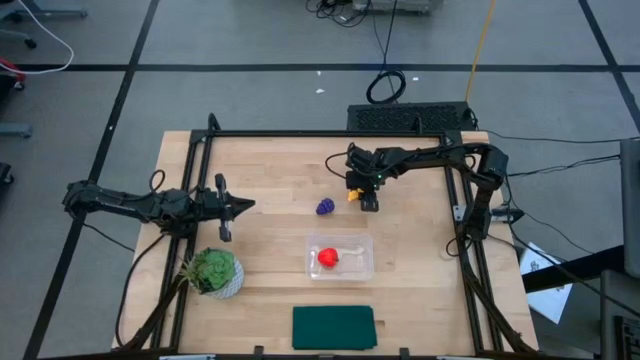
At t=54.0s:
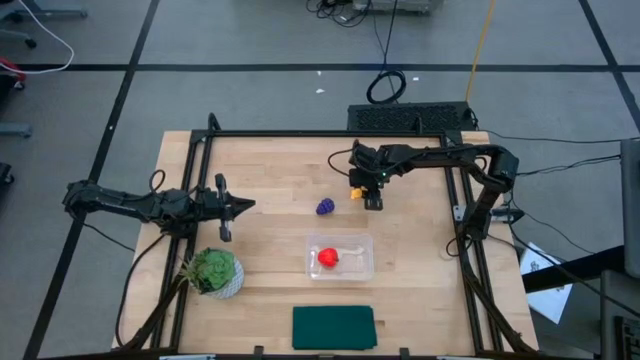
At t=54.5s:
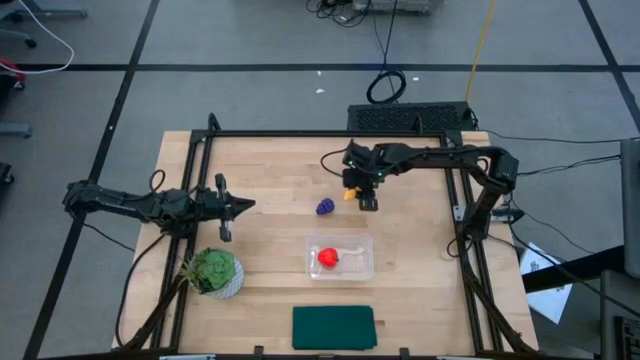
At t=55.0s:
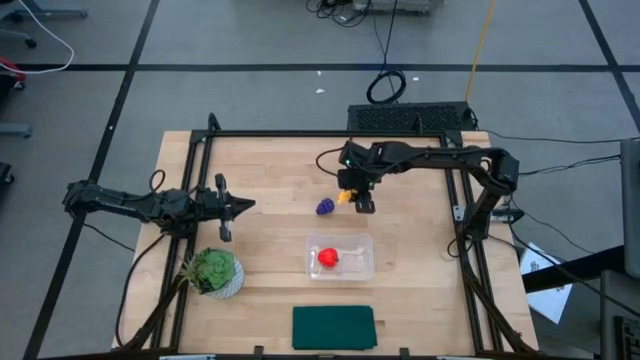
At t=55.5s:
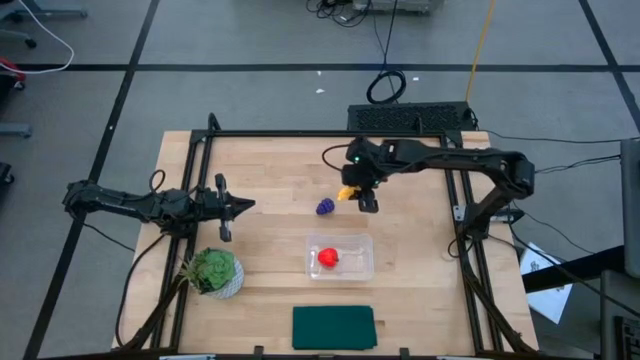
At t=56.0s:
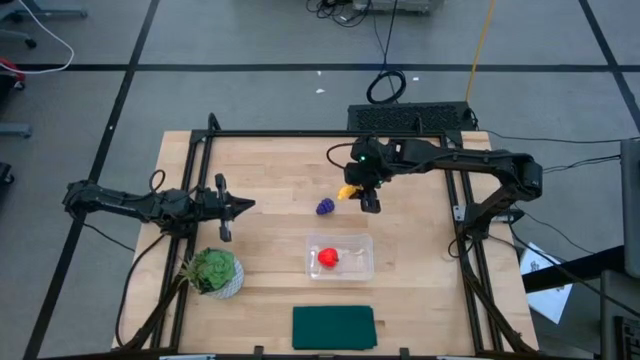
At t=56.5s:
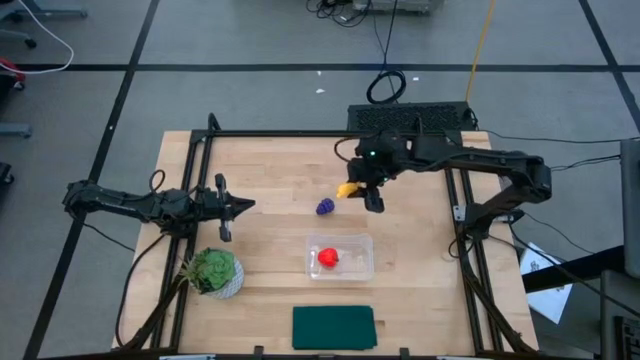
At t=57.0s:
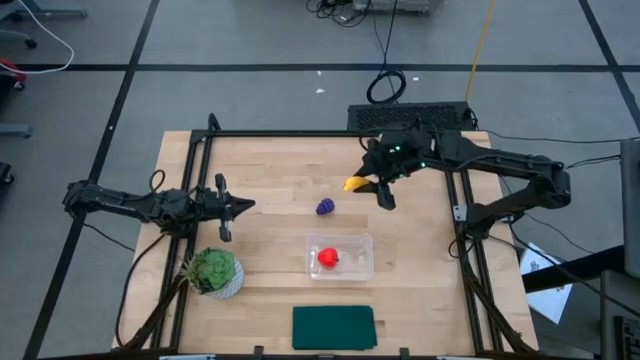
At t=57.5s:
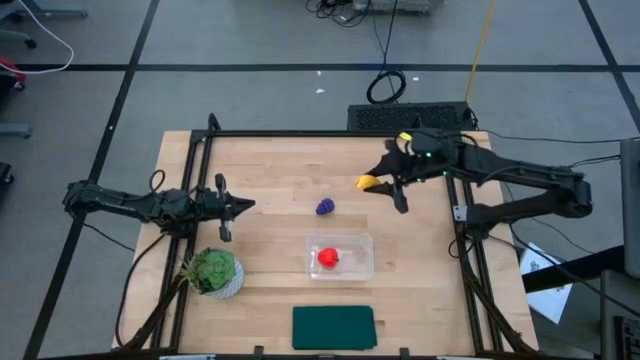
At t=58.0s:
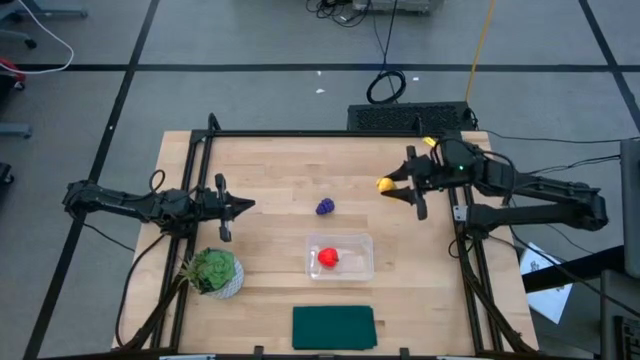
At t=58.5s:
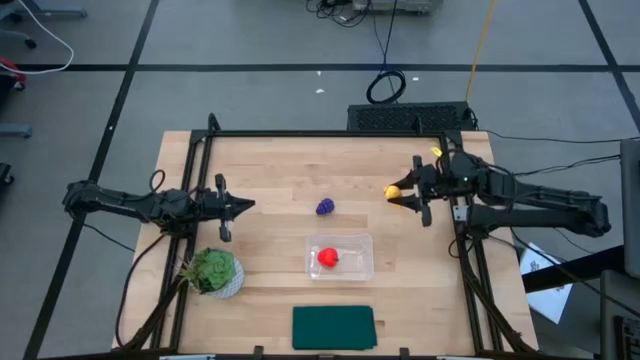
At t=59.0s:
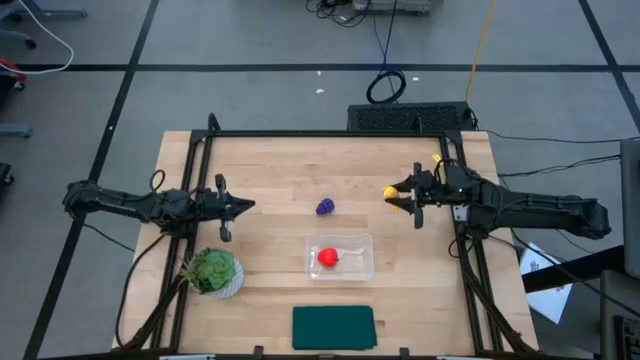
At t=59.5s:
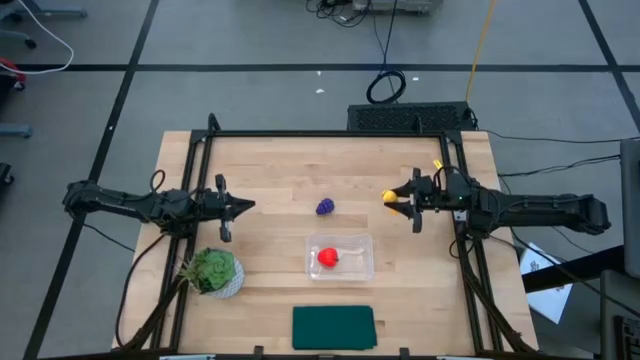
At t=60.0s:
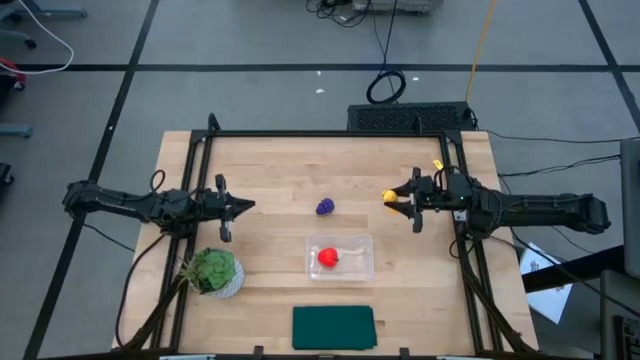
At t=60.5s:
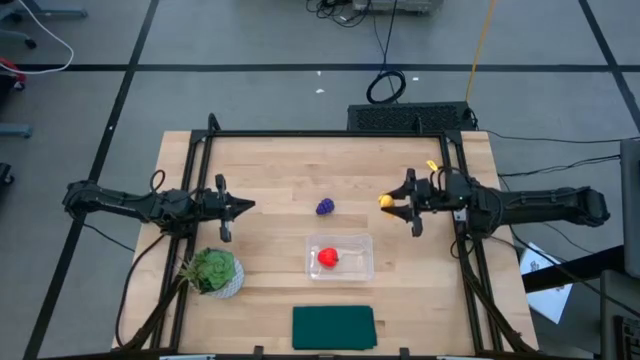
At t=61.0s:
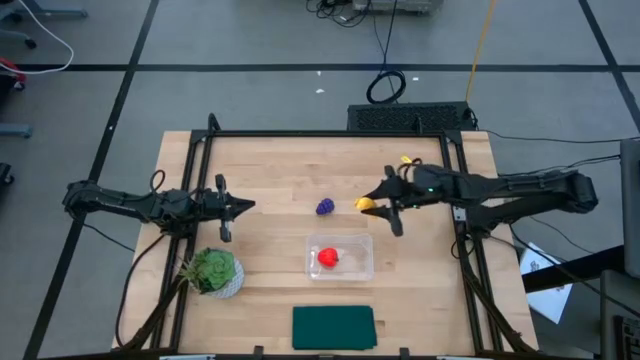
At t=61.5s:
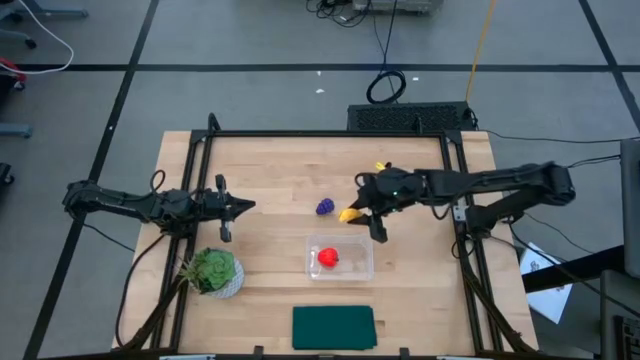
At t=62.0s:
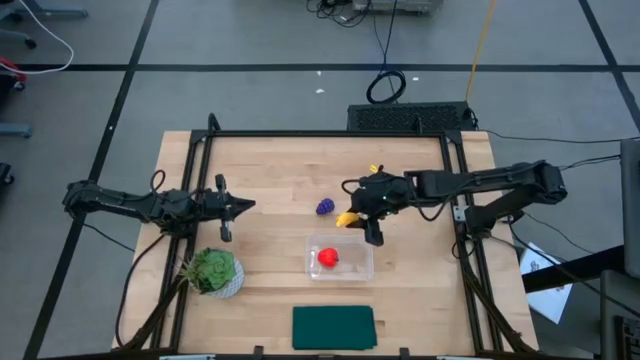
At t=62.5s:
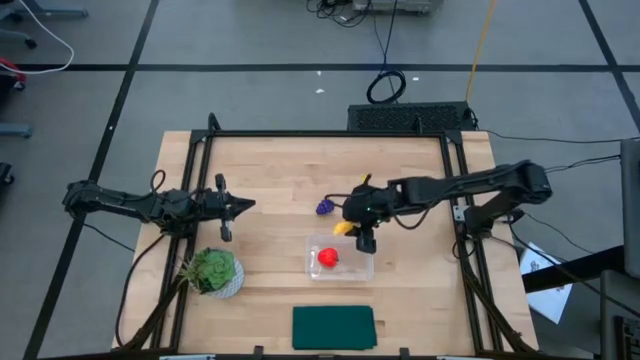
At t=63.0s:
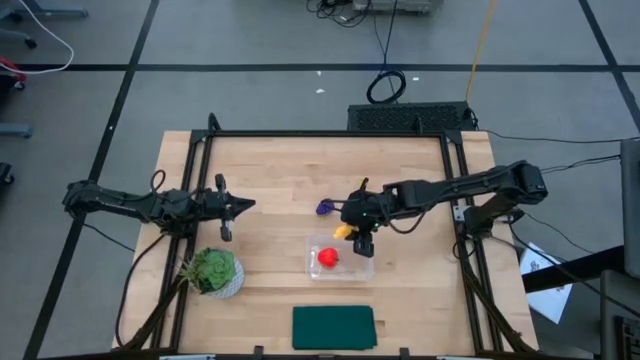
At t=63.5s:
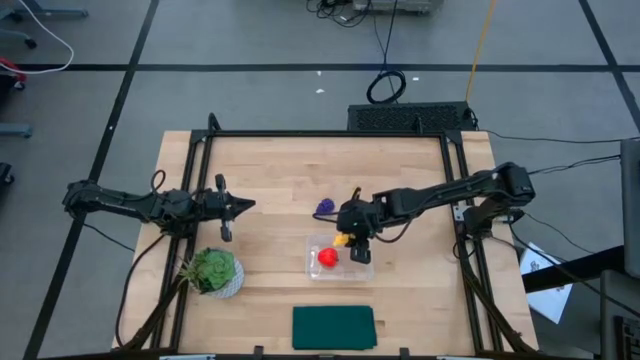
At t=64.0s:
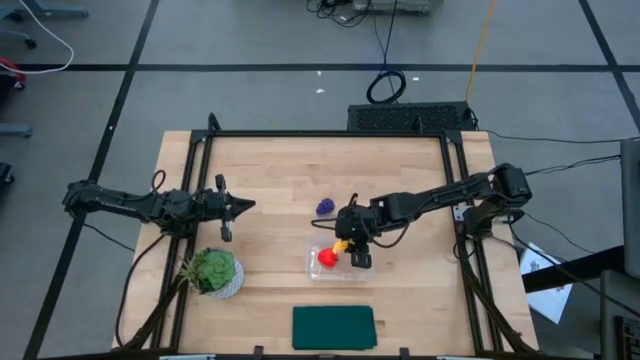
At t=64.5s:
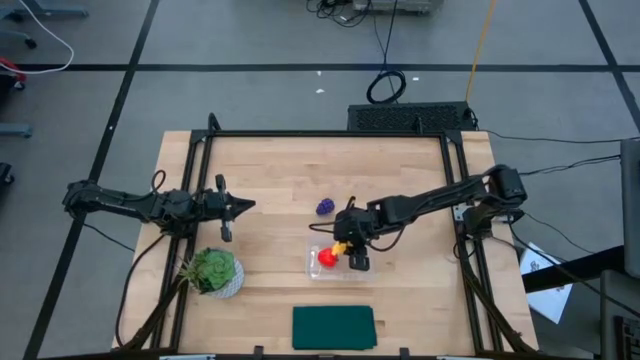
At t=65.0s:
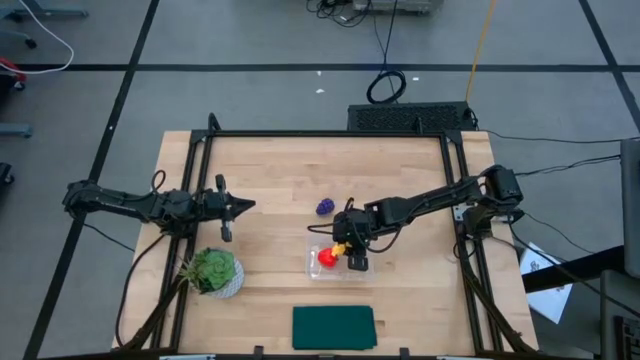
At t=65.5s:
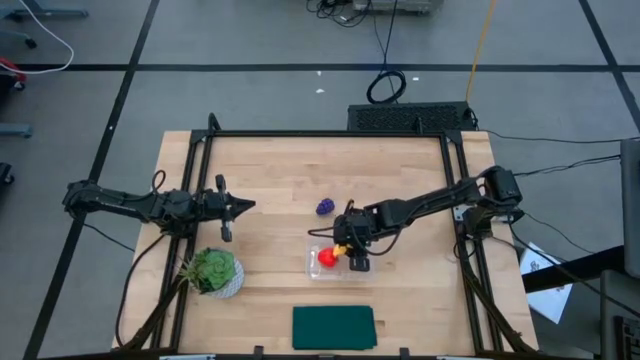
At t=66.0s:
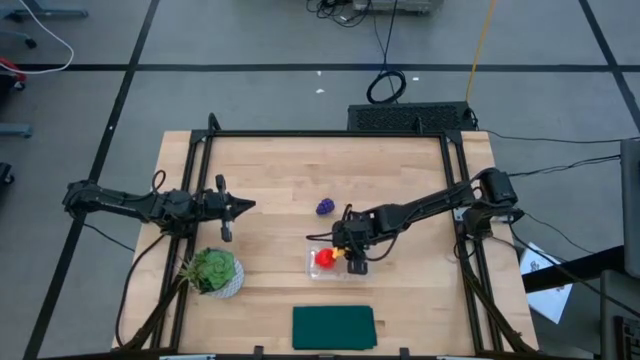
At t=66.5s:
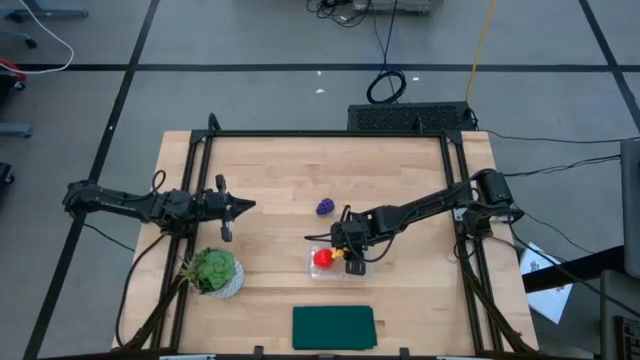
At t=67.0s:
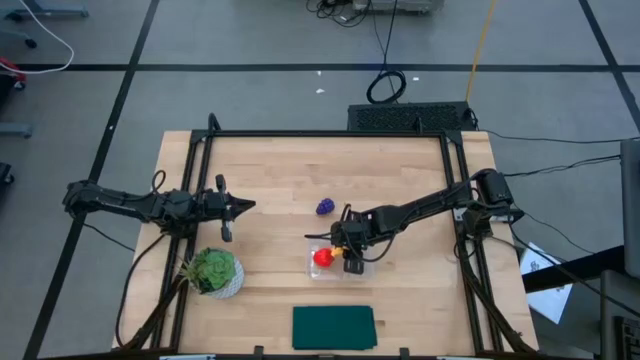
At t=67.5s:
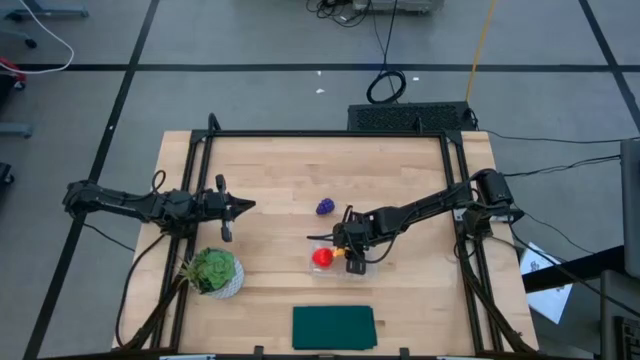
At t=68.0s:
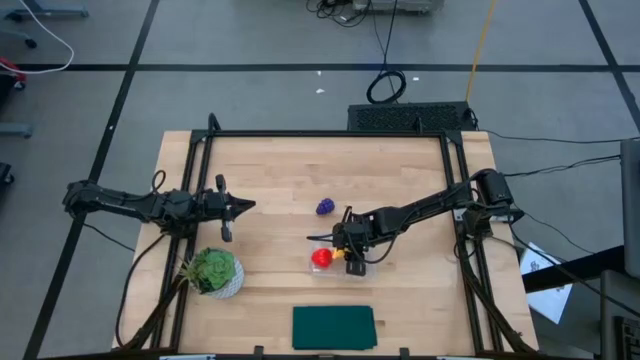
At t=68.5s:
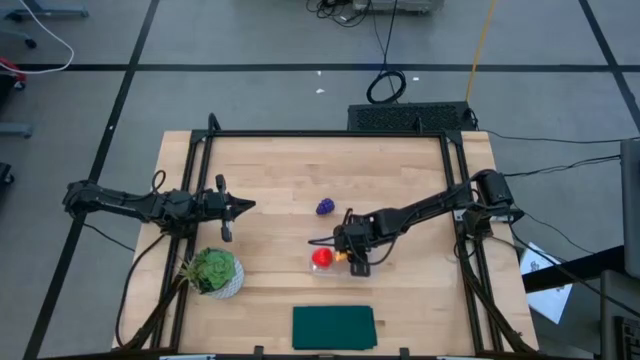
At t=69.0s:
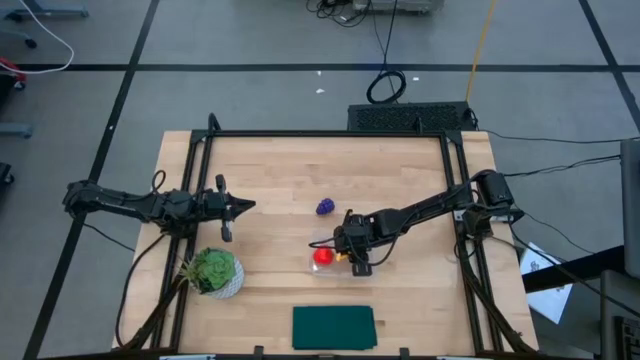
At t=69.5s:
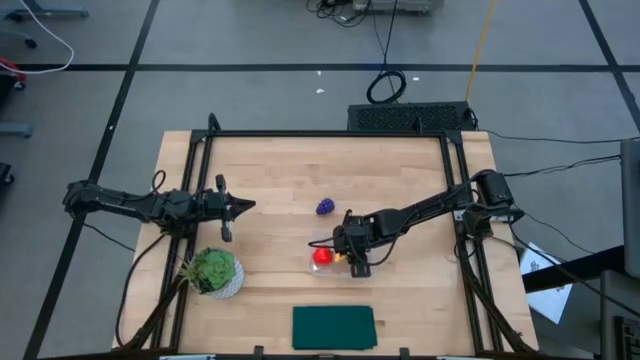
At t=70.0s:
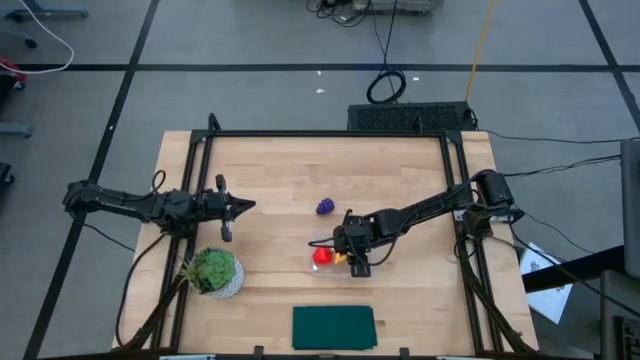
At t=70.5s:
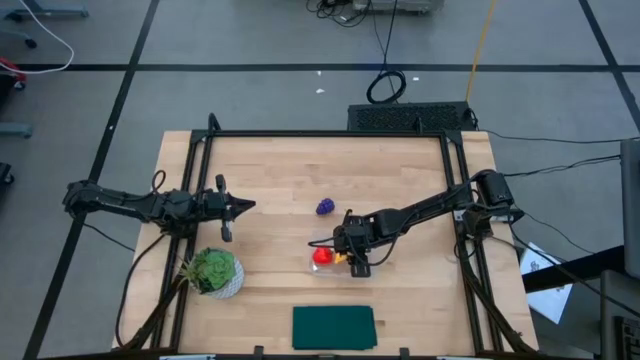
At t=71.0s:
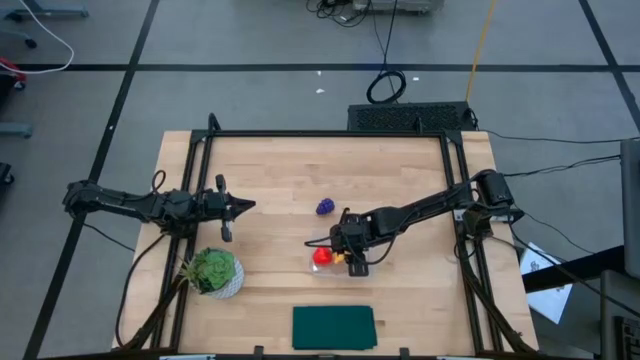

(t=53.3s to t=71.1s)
Task: Pick and placing Produce into tupperware
Put the banana into the transparent bin
